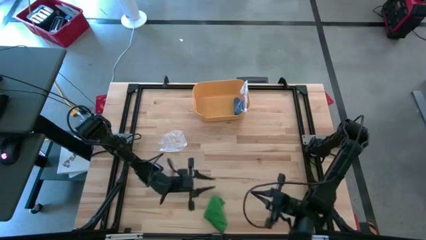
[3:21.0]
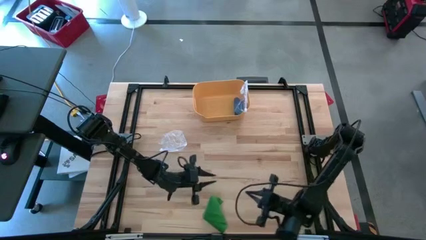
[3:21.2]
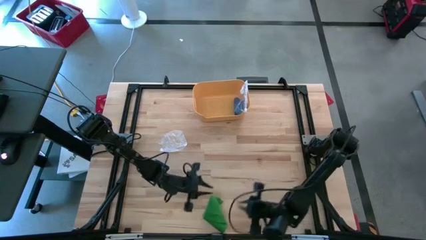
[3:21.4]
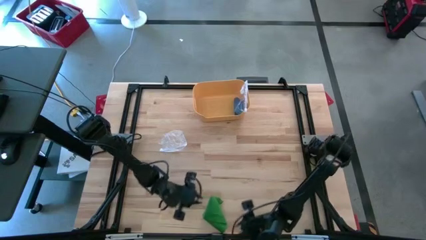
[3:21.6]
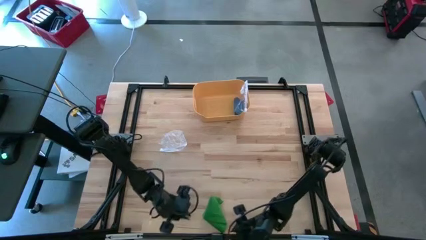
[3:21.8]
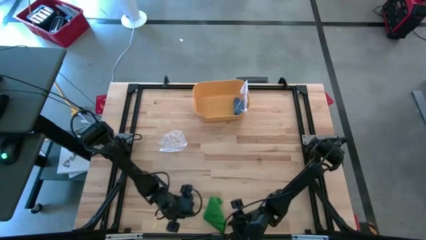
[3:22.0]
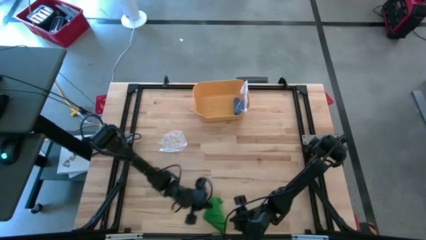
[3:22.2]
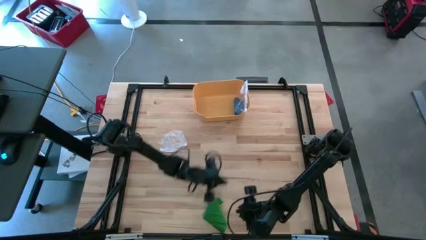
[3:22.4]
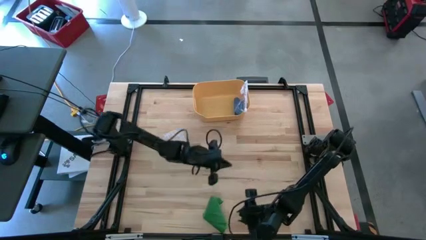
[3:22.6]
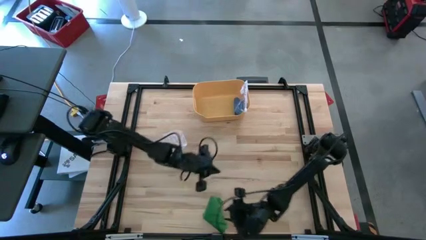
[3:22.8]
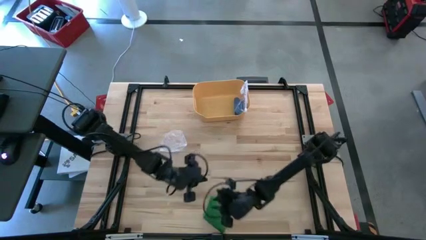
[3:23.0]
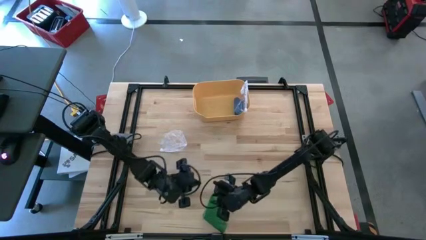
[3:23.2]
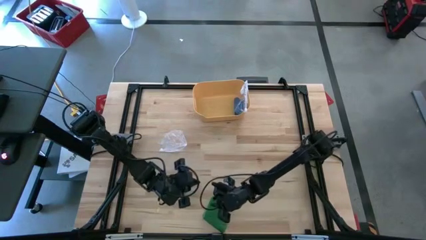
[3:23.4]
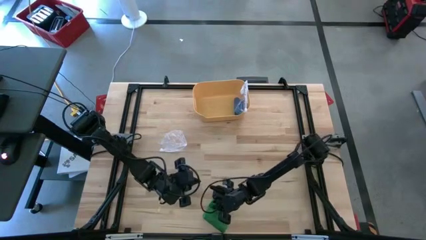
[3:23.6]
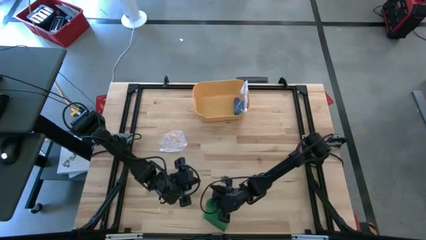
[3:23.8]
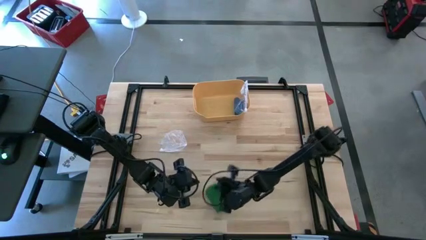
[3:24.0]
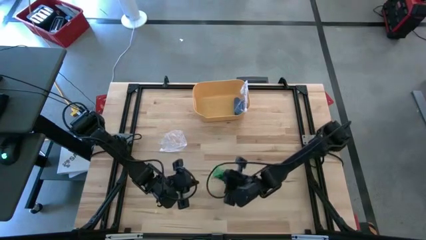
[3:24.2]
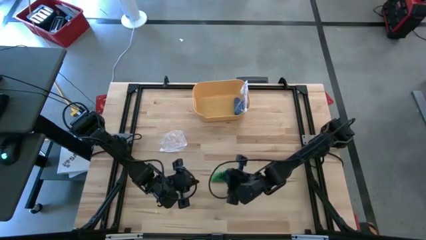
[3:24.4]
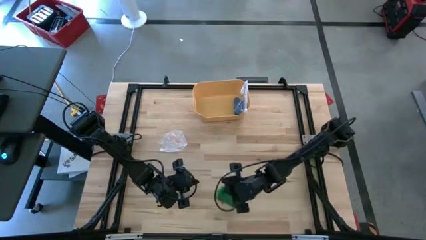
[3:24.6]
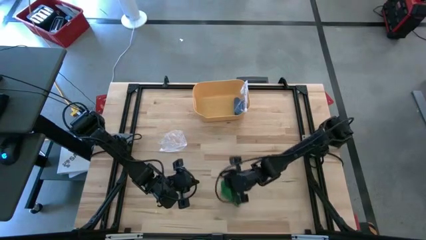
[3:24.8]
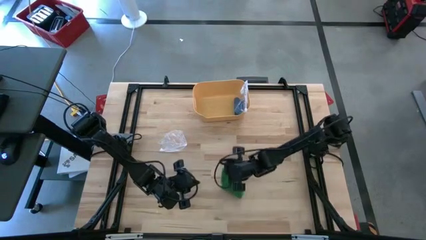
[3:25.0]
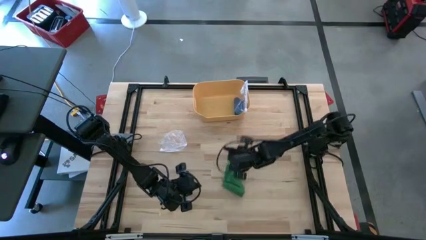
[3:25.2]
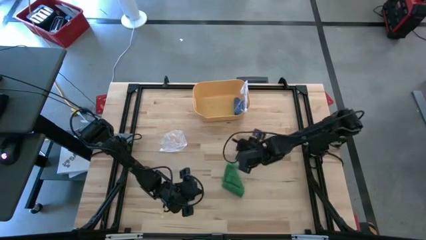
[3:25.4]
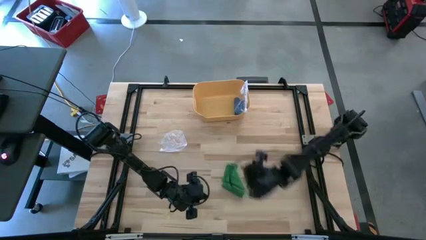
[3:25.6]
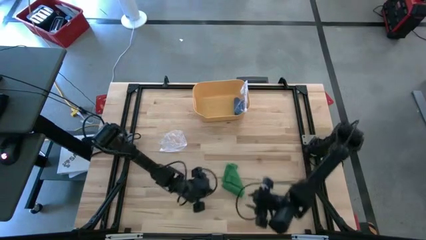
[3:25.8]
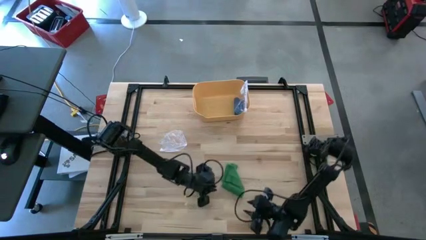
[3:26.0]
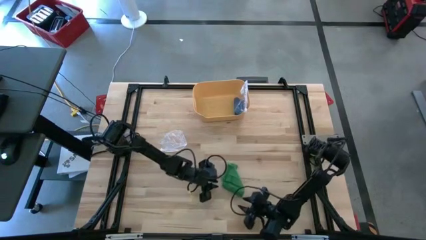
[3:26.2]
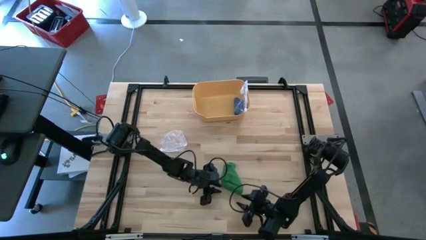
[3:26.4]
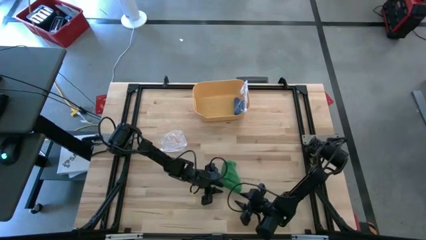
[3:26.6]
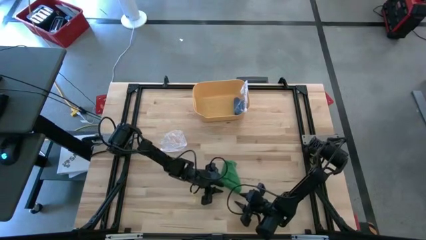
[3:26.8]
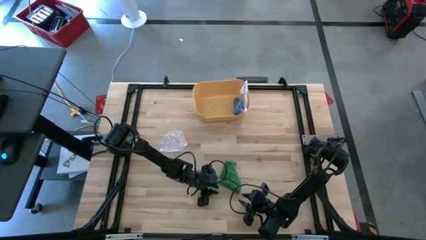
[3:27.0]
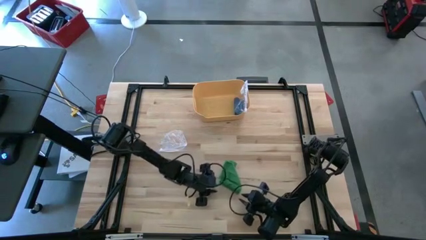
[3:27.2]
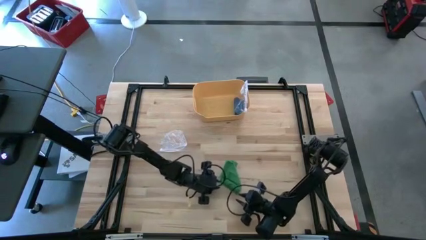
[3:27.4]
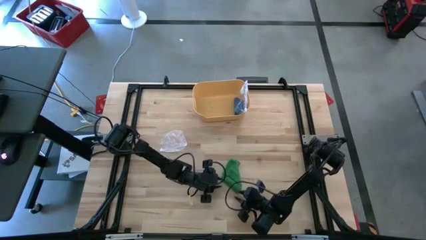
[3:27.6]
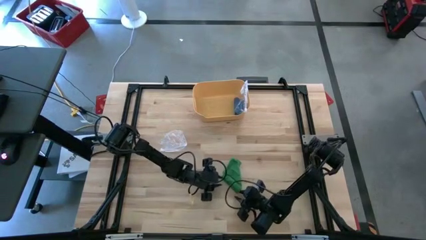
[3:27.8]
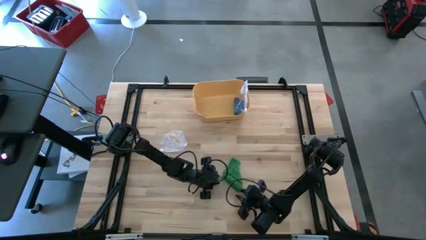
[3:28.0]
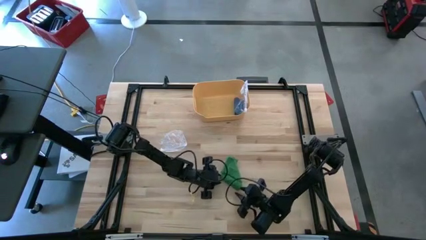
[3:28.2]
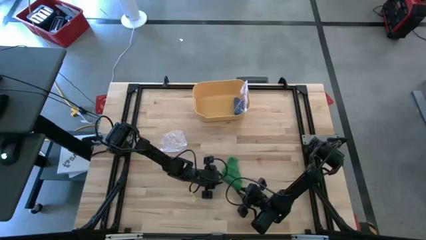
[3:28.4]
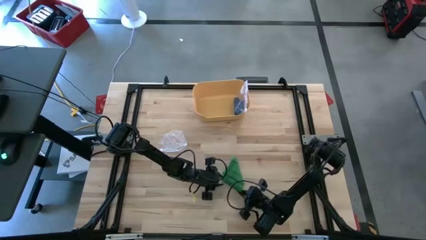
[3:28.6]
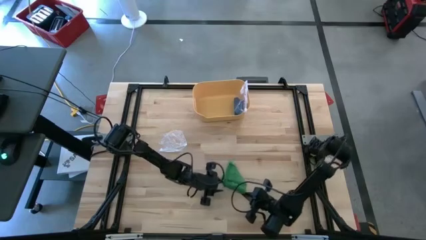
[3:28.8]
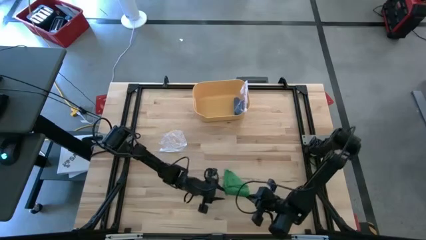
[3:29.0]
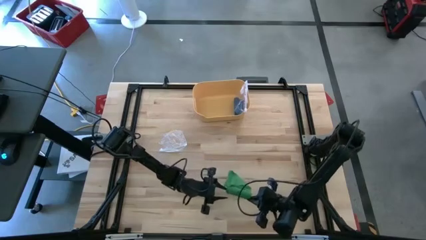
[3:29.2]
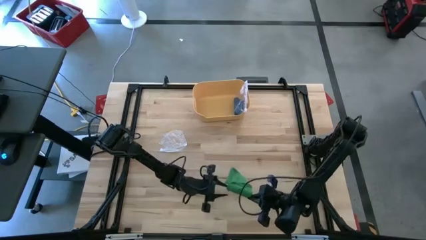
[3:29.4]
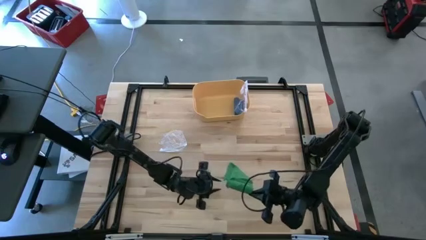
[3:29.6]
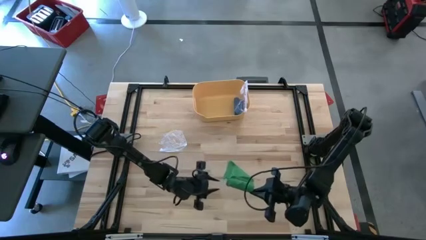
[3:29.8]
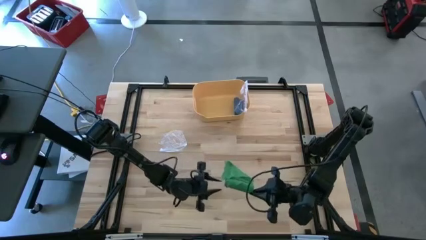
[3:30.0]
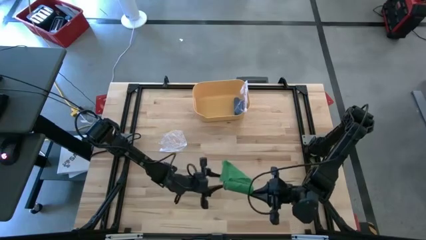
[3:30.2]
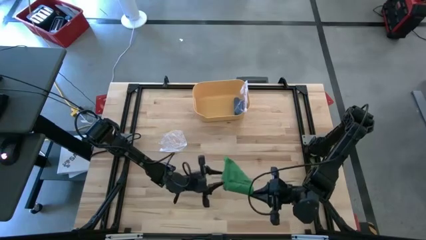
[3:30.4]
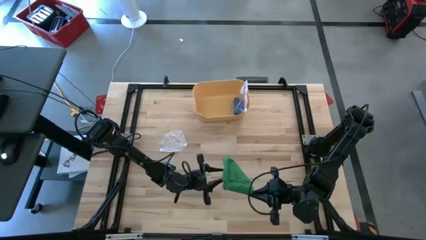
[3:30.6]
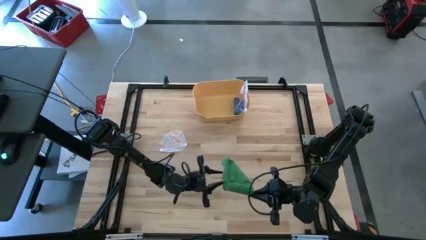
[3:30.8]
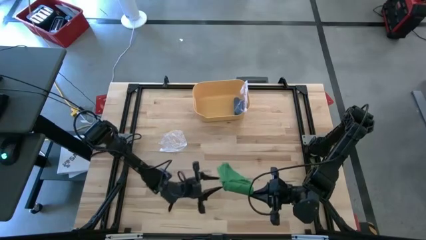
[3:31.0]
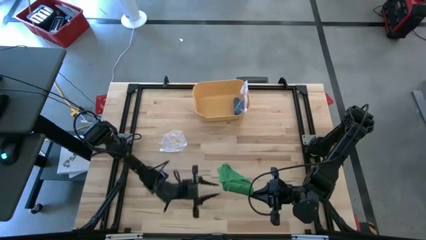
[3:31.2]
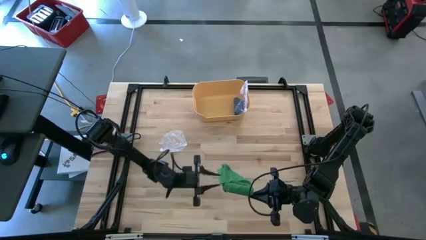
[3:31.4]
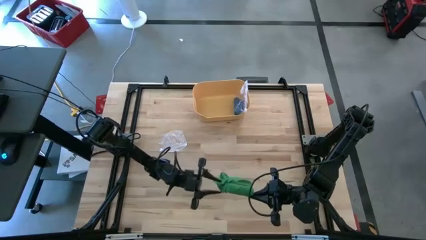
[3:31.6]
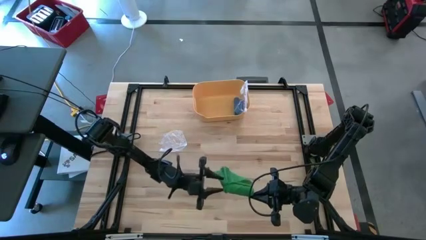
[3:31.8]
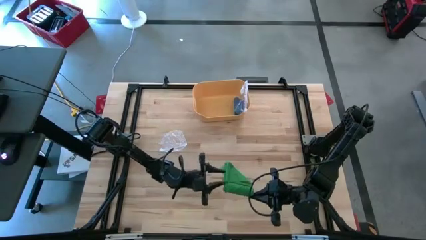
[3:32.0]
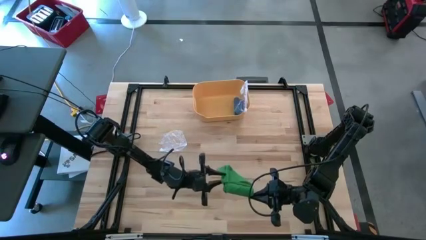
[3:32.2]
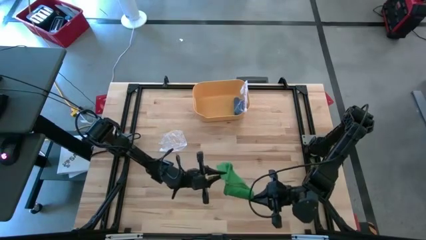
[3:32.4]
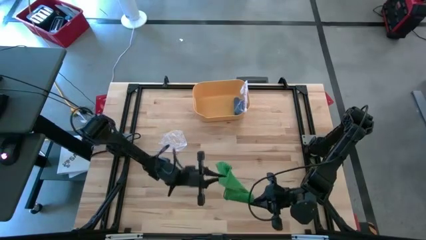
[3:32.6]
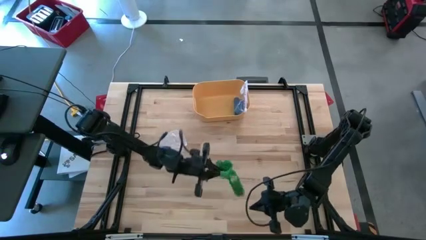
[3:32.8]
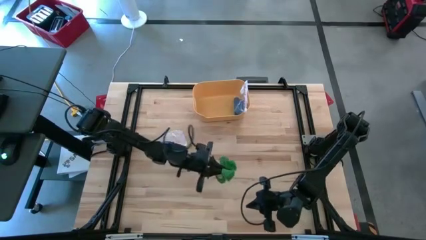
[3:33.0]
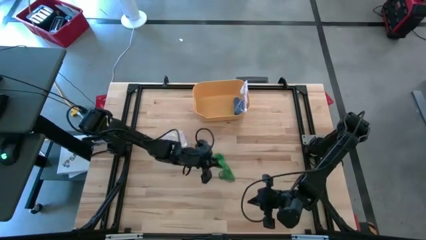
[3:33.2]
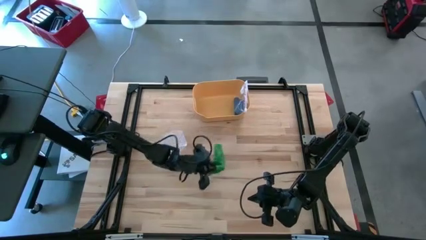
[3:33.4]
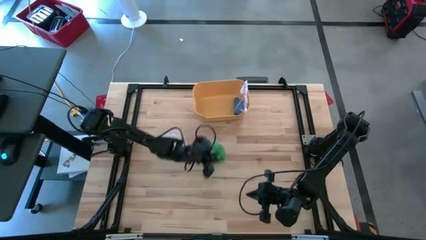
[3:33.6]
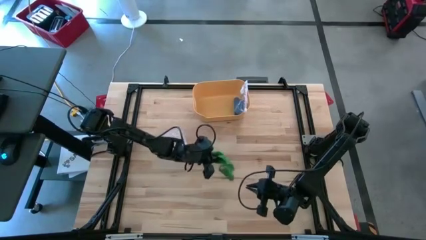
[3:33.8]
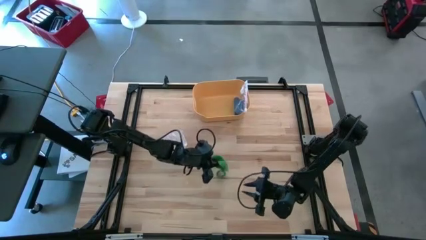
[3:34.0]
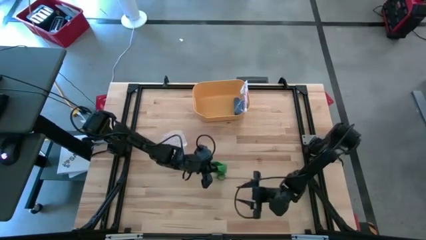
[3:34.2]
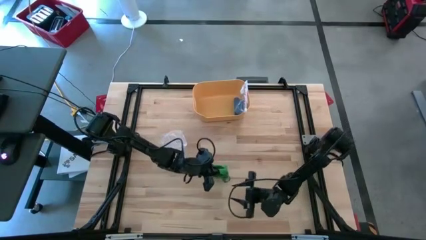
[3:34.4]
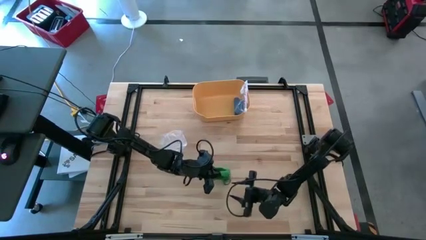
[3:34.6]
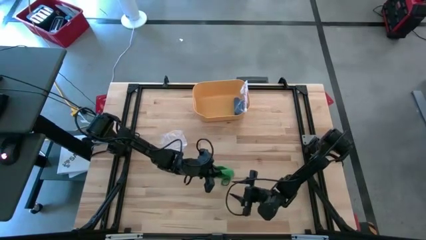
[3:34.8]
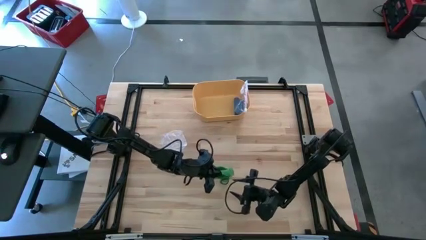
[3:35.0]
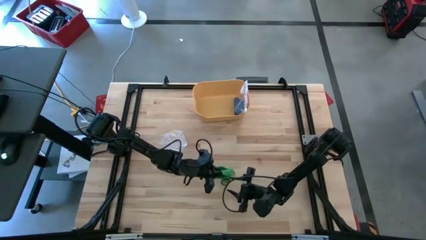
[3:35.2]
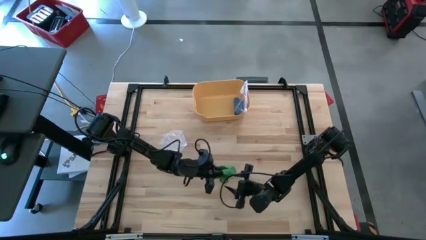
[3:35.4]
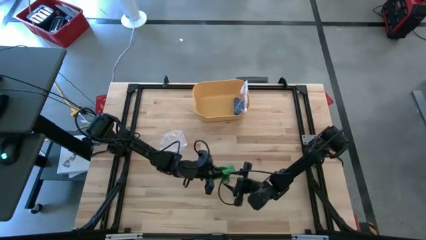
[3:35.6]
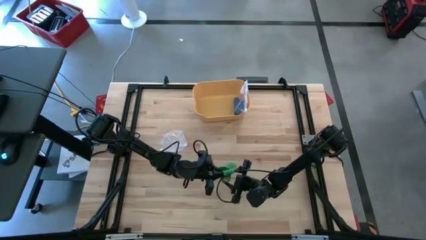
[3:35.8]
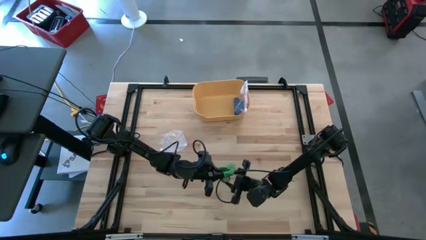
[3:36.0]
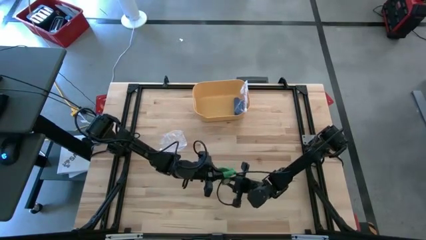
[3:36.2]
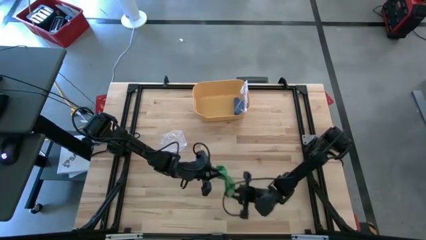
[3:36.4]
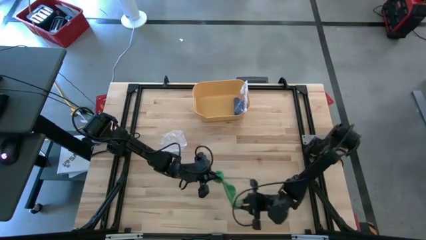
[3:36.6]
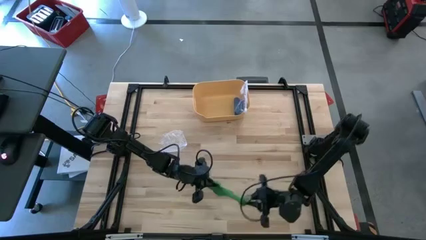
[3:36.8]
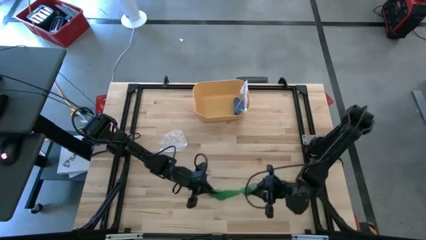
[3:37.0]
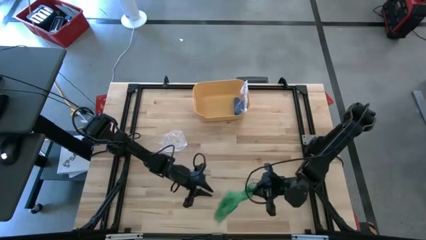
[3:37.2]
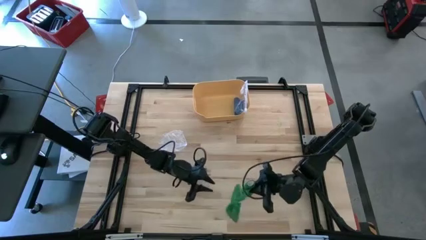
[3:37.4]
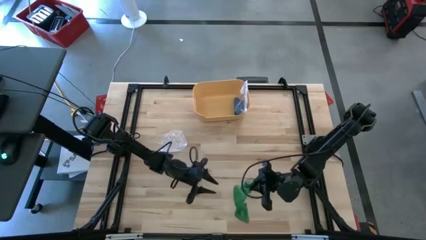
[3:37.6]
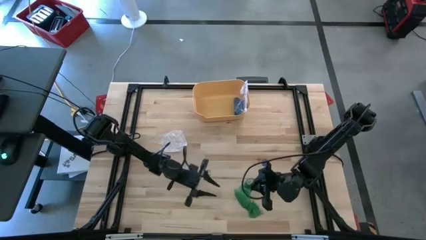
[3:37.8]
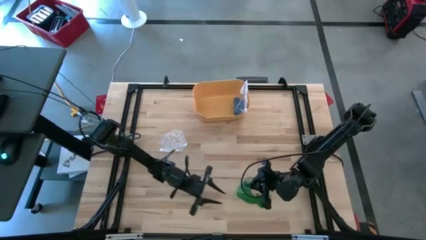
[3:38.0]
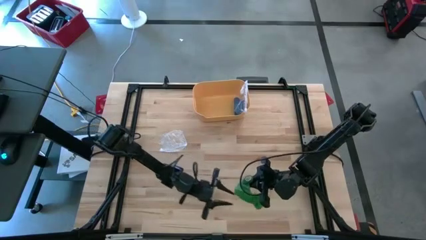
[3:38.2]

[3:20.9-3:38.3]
Task: Roll bandage
Roll the green bandage
